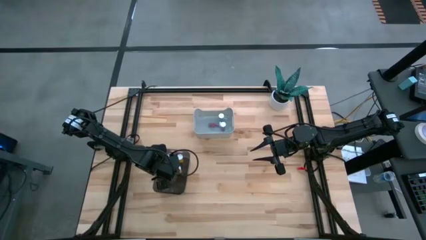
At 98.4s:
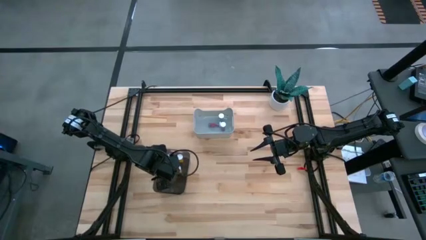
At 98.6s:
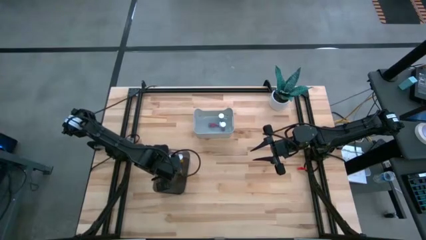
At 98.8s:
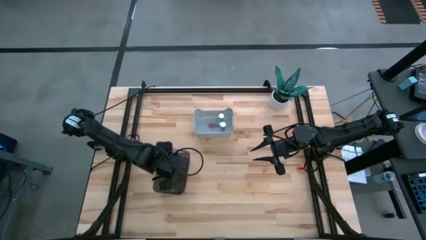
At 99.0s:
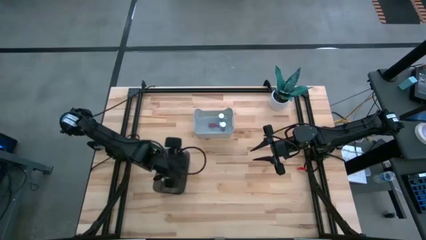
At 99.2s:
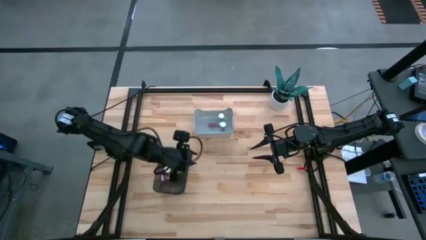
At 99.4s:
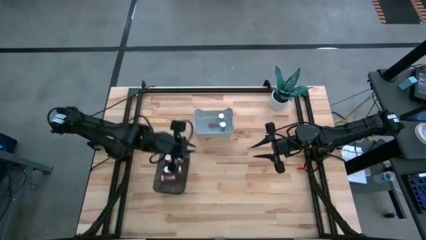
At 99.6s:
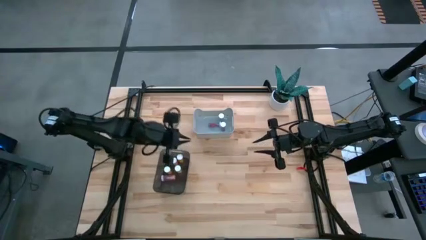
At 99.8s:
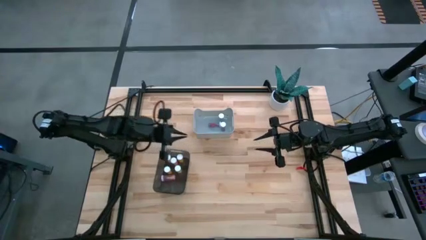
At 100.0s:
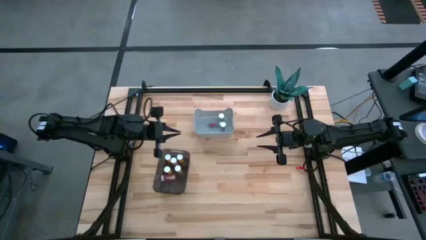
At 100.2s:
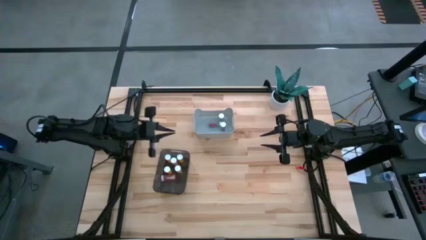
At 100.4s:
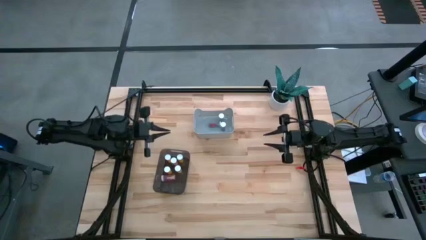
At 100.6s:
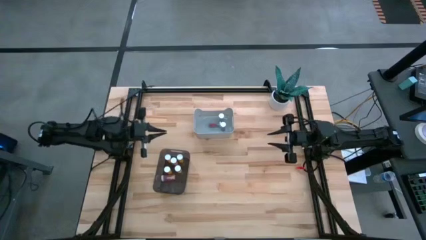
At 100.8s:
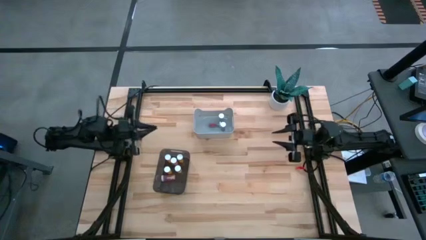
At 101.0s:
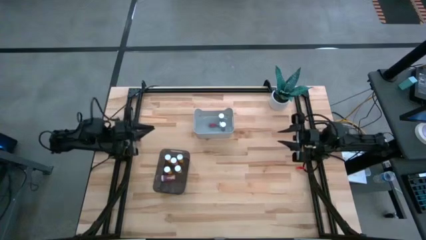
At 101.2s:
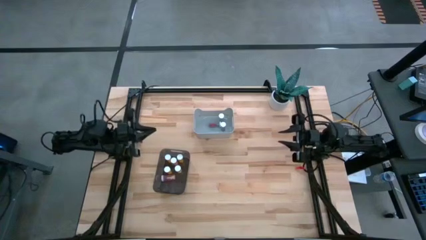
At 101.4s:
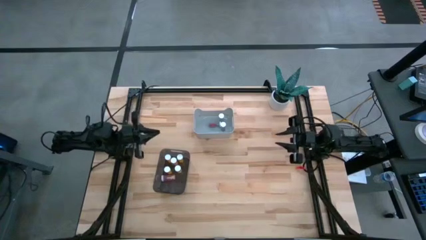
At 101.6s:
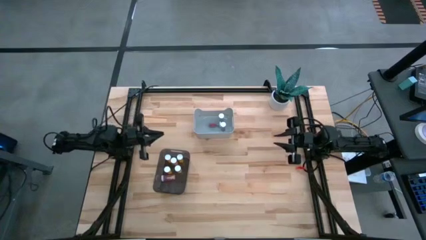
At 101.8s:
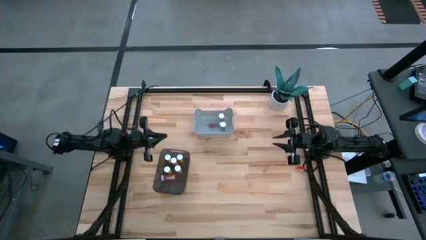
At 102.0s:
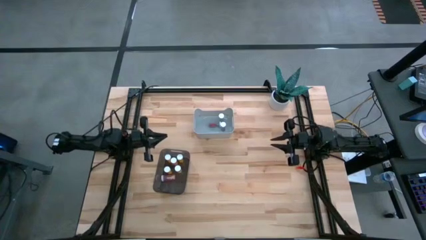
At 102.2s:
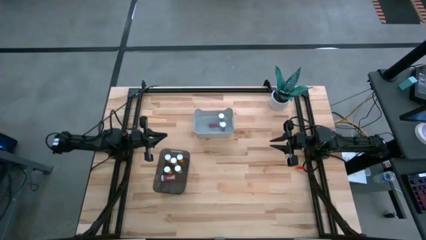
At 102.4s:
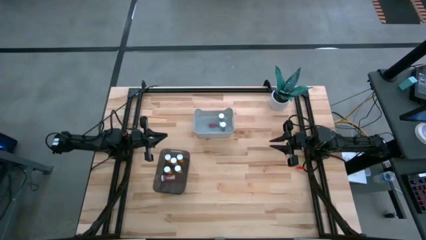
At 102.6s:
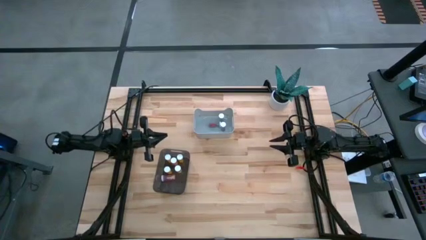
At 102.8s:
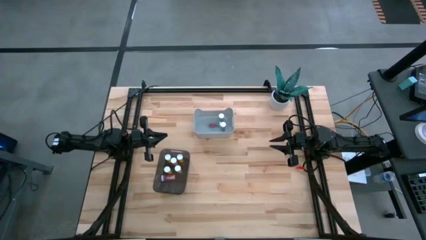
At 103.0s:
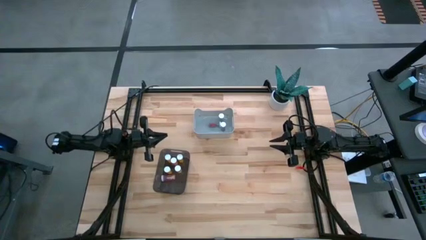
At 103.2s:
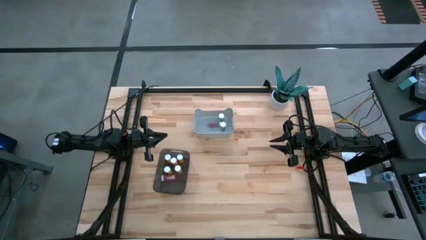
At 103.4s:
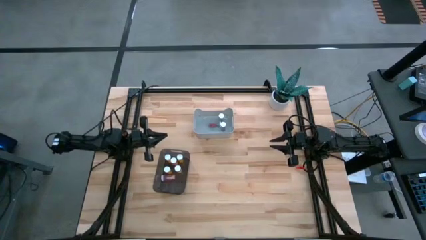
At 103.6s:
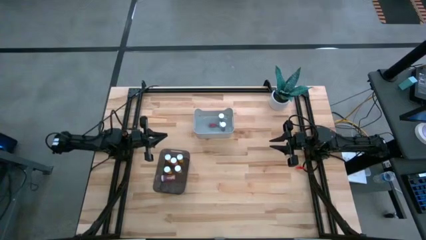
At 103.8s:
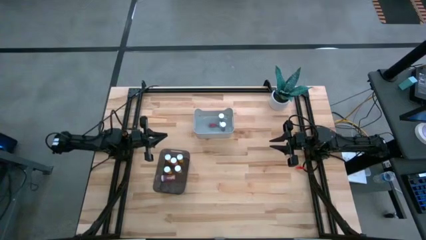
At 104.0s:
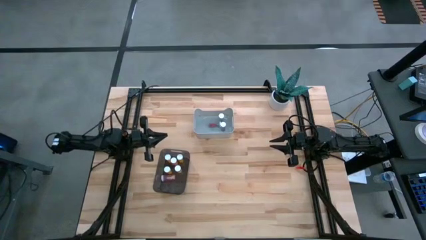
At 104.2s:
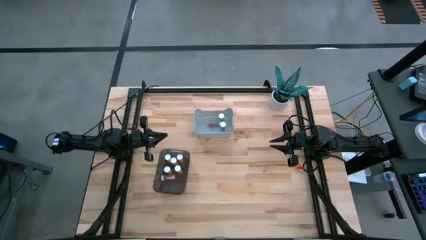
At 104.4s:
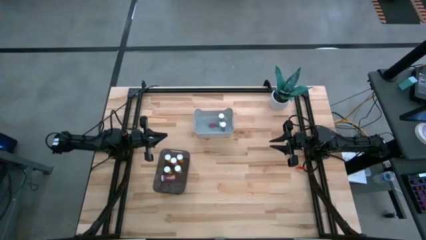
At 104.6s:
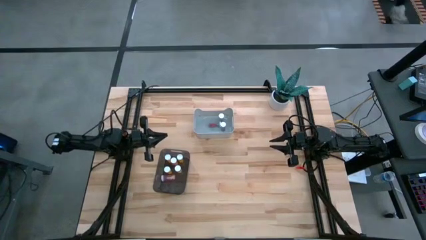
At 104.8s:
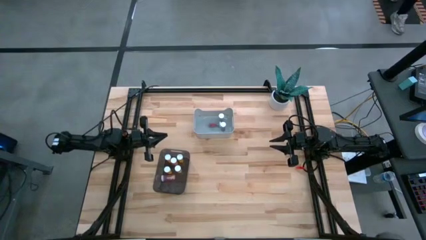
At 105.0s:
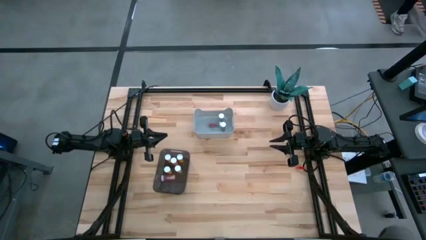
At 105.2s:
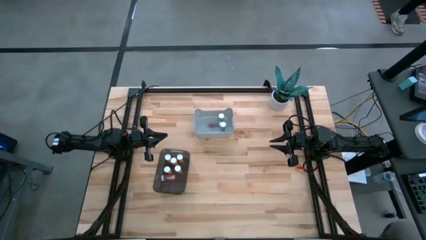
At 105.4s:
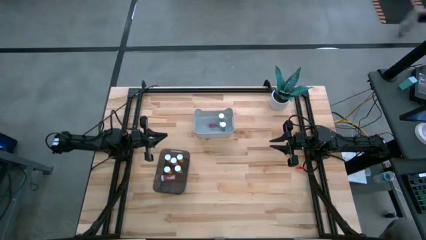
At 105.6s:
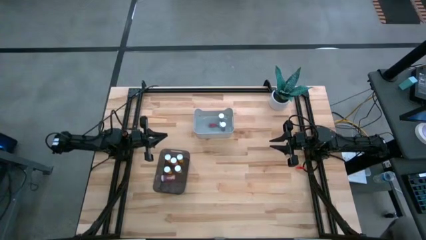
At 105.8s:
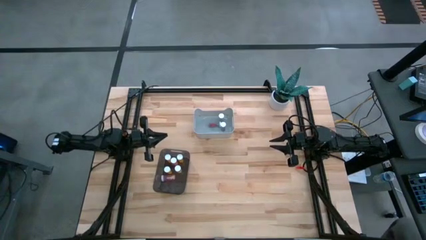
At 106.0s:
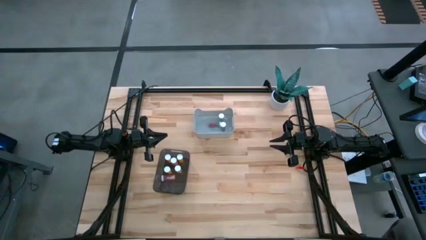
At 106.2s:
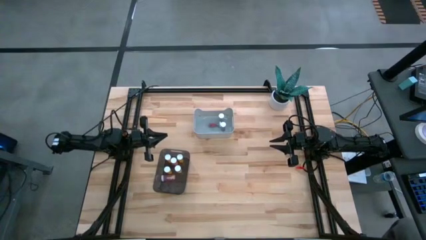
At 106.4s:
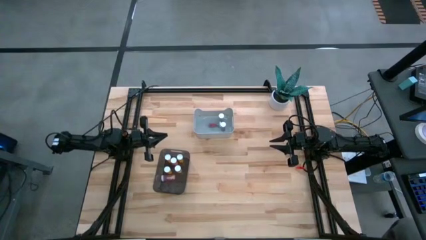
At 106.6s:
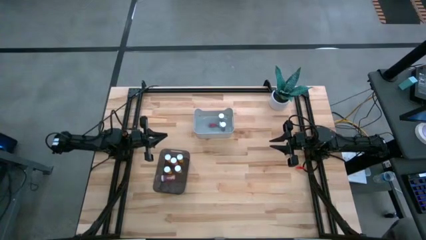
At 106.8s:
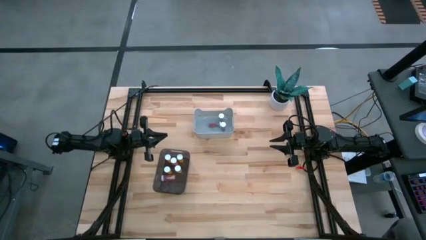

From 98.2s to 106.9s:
Task: Pick and place medicine bottles into bin by pill shape (circle, oval)
Return to Home Position

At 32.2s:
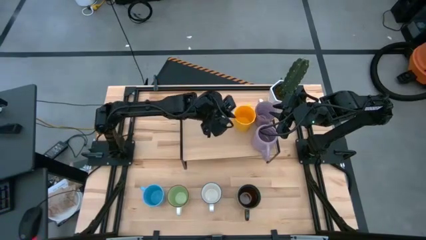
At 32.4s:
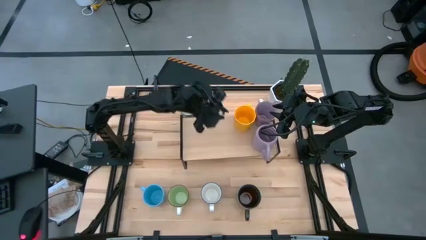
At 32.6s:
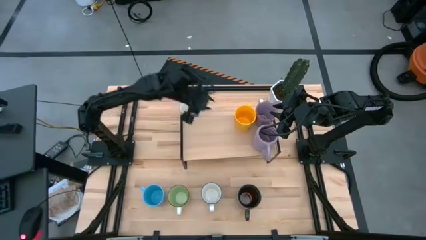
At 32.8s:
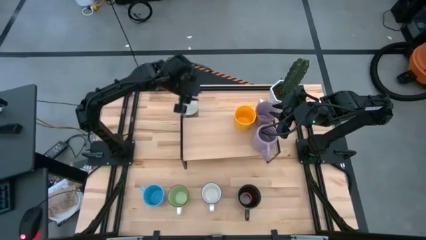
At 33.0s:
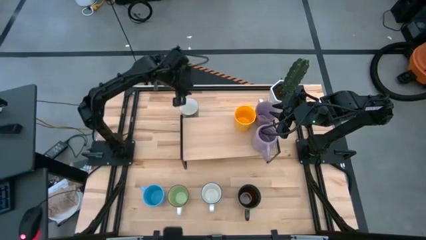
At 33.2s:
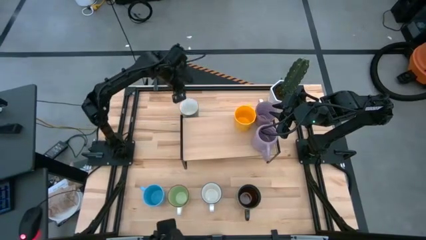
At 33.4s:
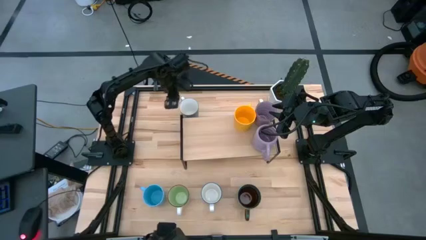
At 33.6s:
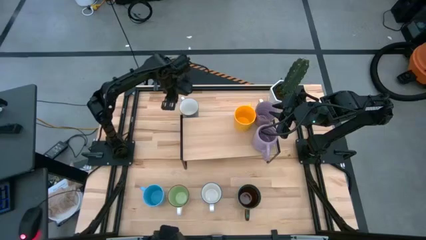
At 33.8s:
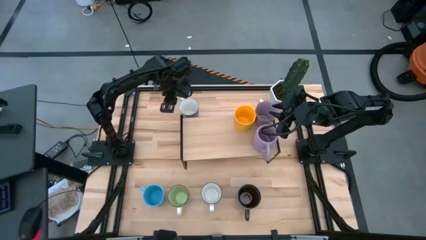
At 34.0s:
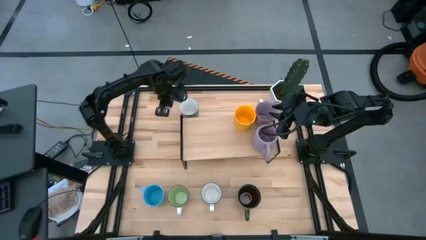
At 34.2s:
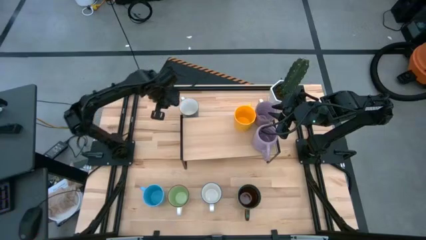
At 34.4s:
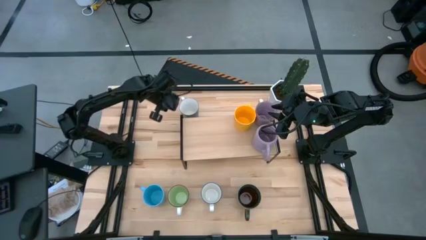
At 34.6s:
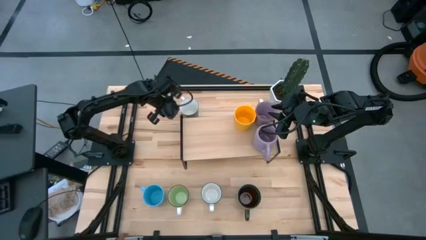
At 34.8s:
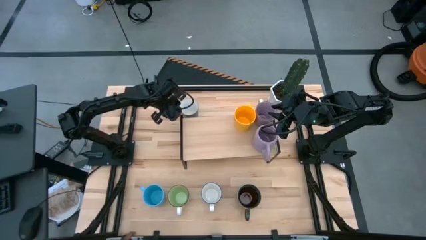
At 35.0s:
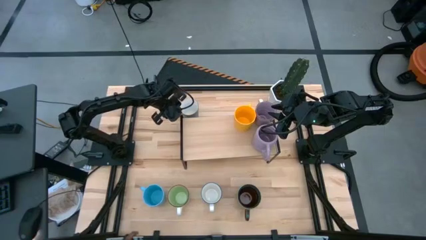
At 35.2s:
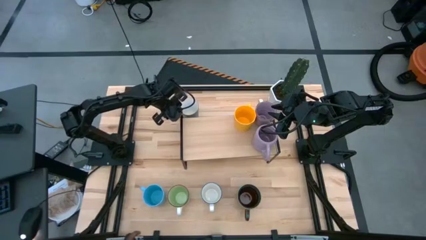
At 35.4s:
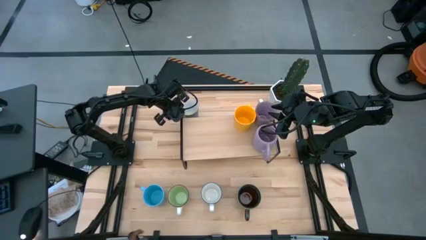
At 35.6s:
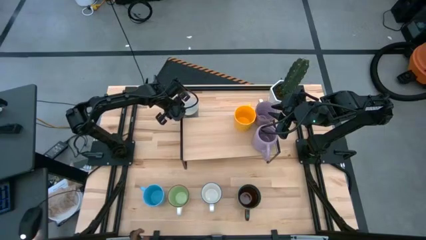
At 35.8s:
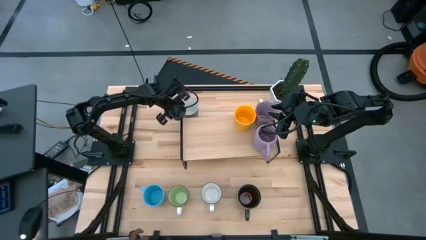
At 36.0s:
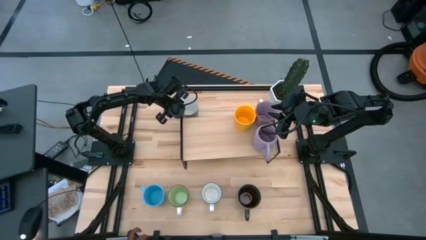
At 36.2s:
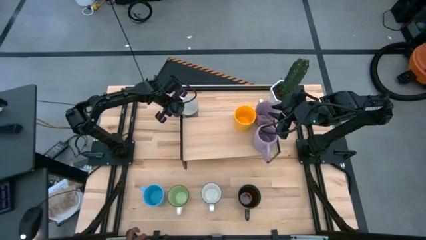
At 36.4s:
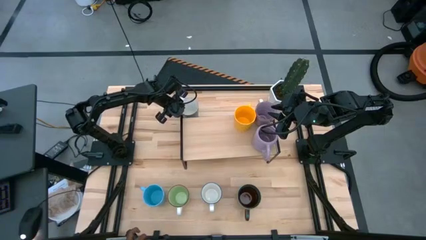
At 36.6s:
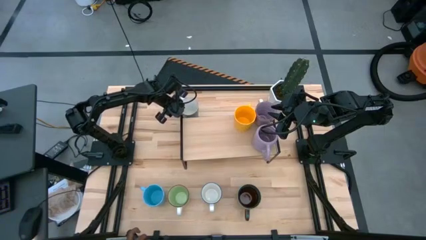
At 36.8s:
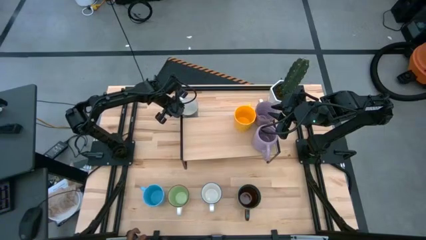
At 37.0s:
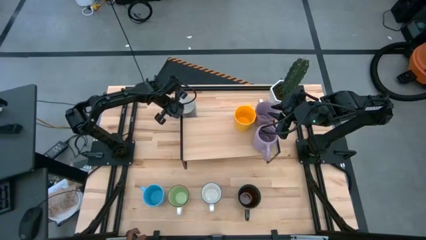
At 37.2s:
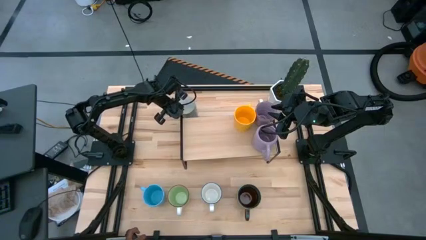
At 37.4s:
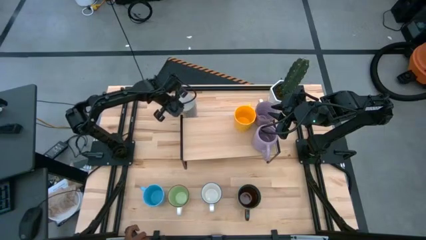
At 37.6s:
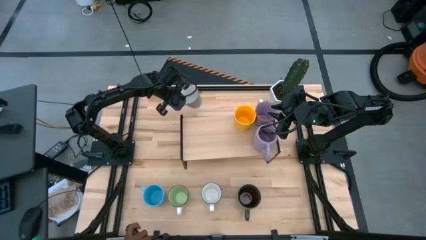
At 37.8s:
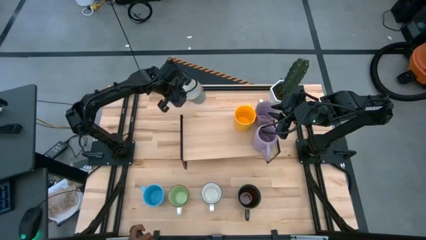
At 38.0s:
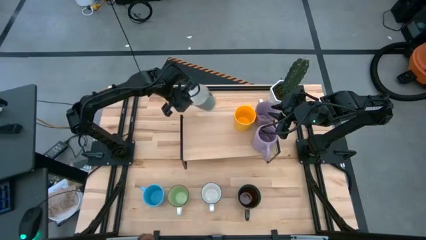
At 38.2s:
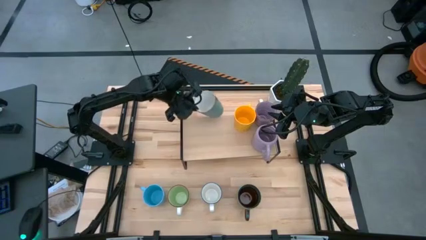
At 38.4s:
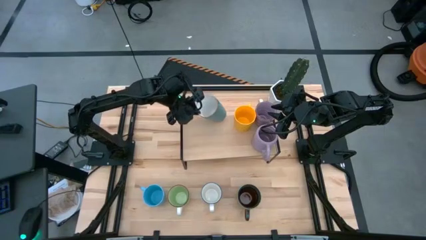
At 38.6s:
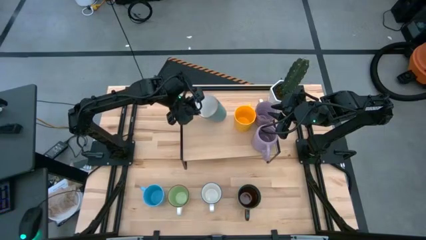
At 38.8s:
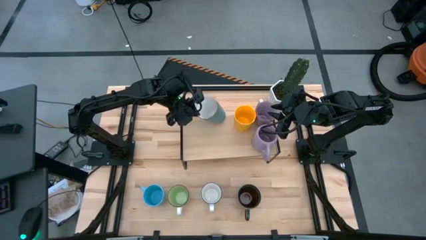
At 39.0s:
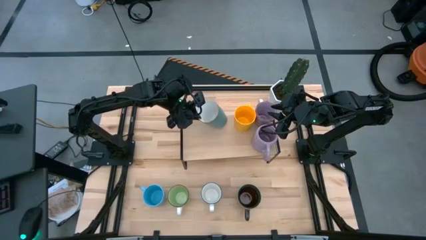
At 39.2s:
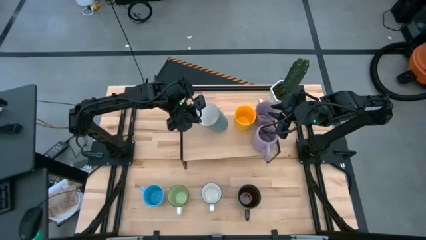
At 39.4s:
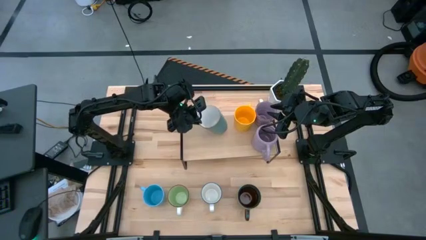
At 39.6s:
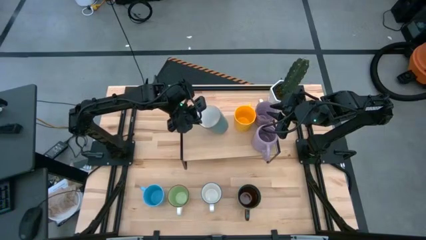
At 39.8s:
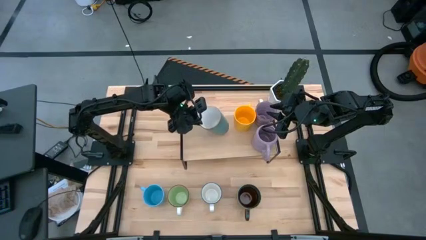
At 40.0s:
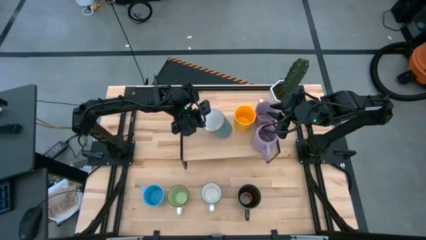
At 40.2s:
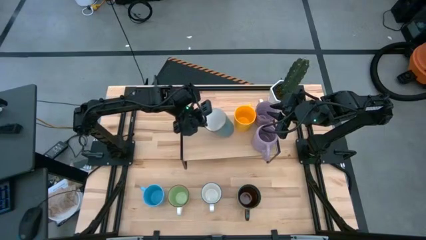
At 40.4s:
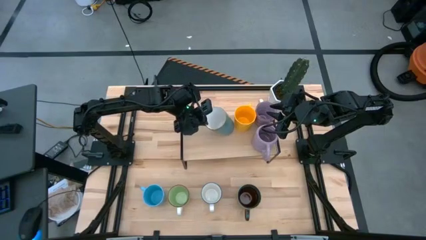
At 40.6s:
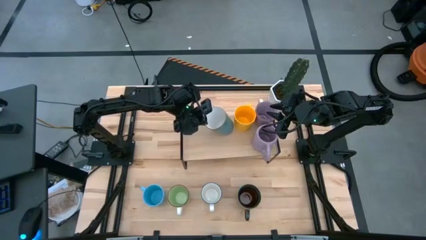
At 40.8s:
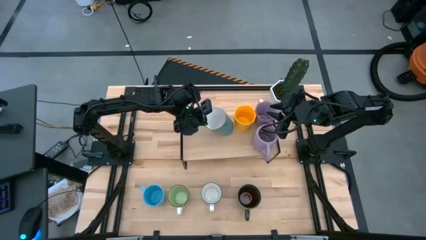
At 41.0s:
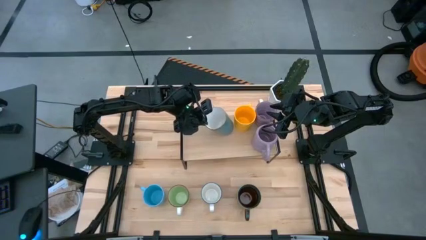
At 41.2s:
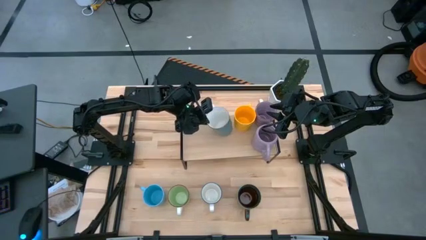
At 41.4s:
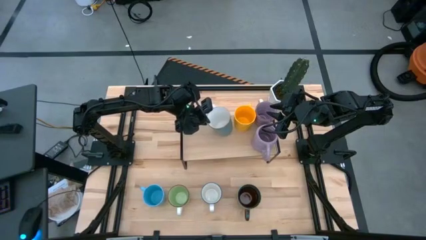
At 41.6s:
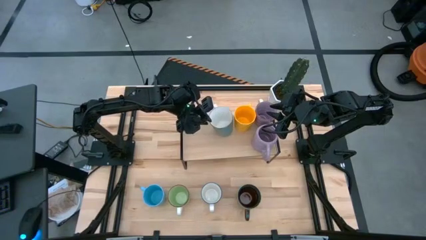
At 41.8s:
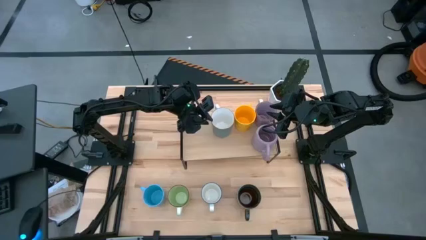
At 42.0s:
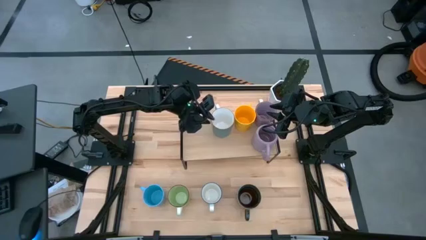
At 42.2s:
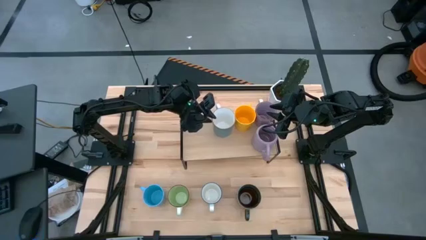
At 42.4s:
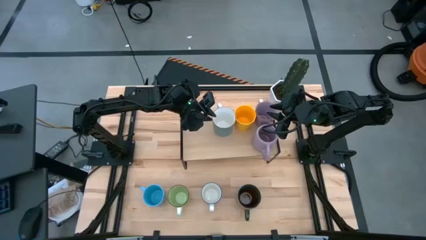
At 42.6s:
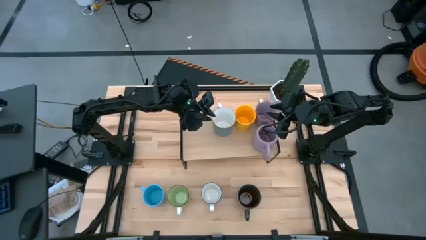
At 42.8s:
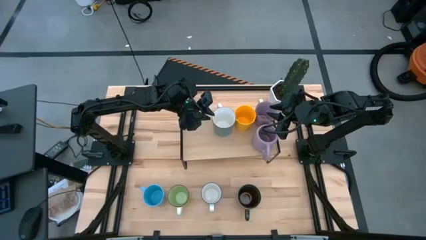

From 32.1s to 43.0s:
Task: Place coffee mugs
Put the blue mug on the shelf
